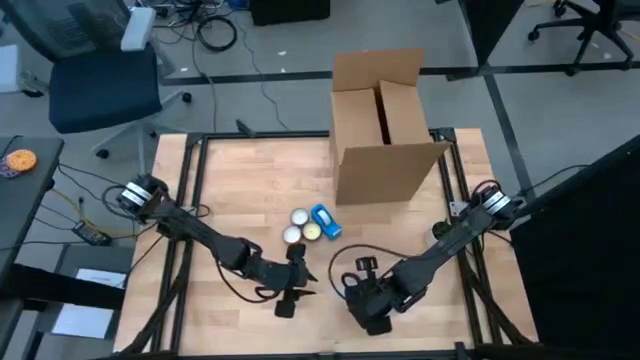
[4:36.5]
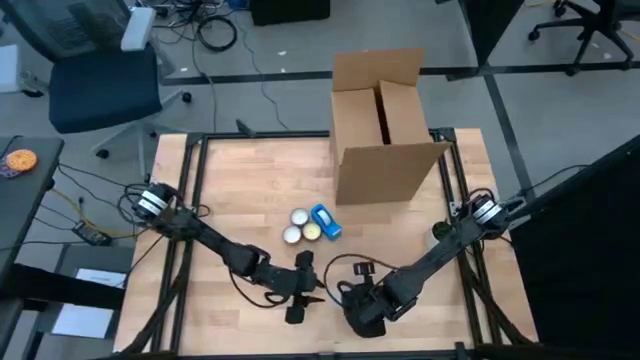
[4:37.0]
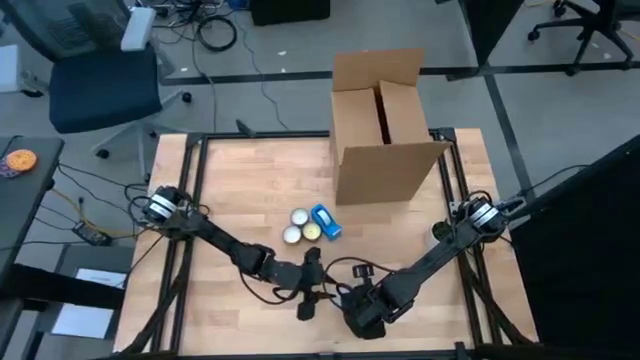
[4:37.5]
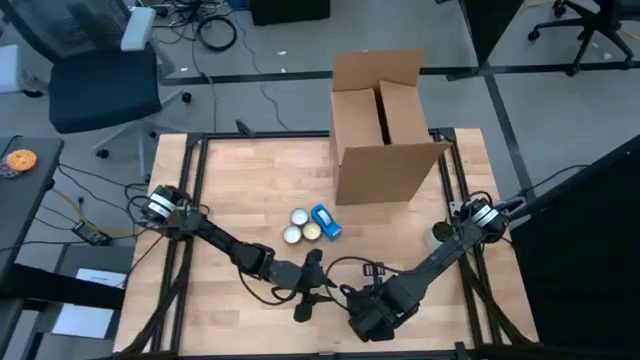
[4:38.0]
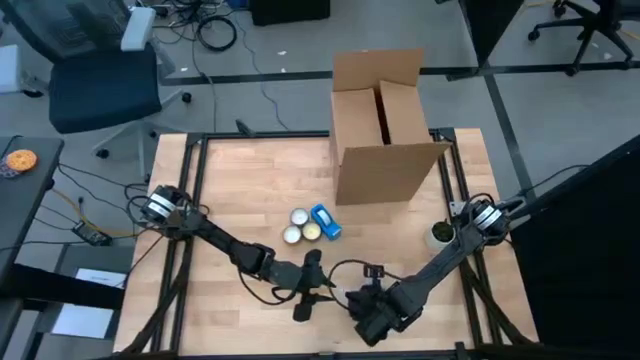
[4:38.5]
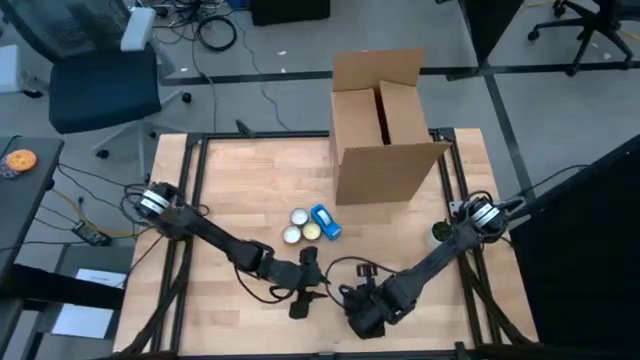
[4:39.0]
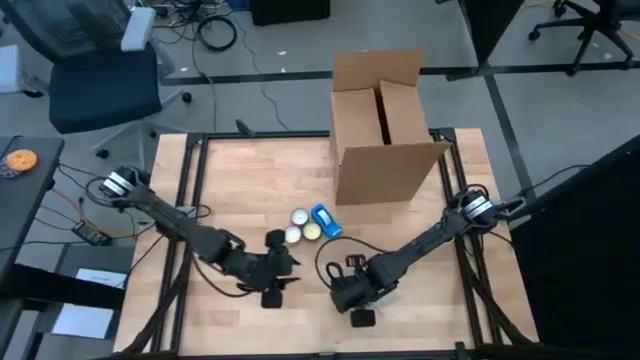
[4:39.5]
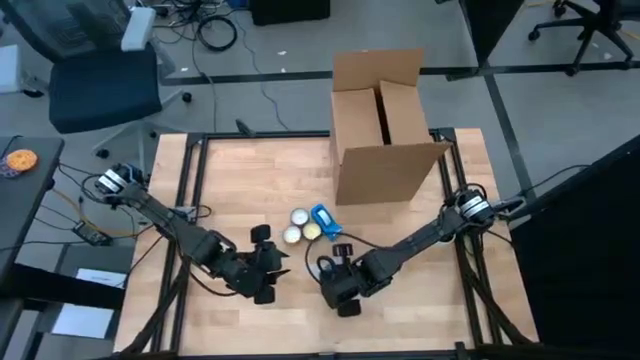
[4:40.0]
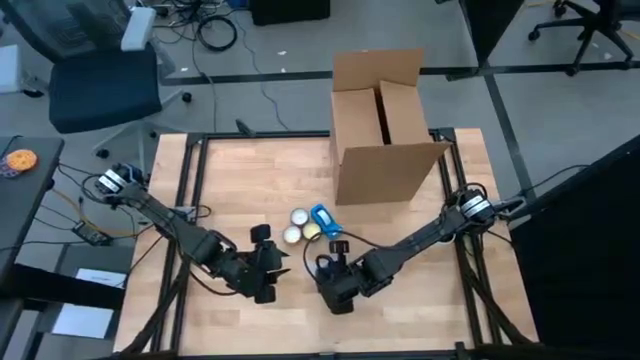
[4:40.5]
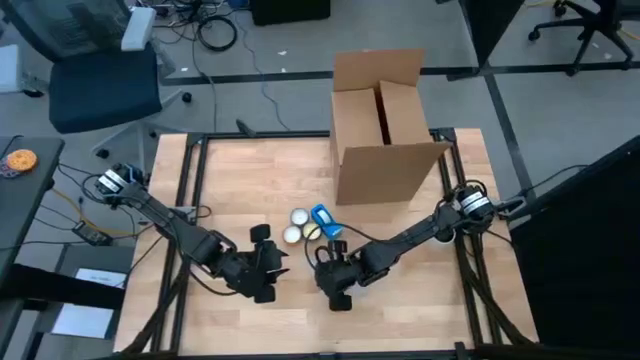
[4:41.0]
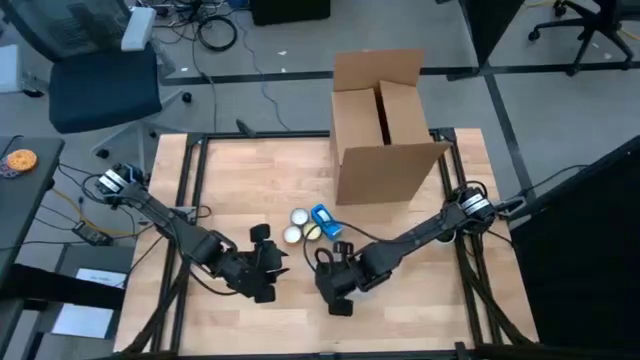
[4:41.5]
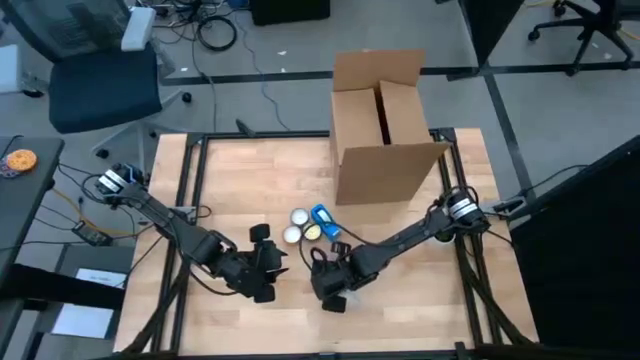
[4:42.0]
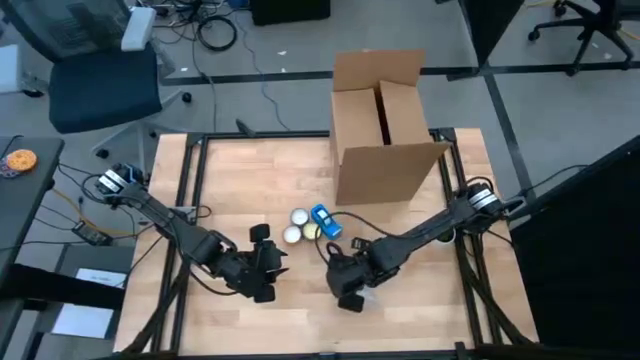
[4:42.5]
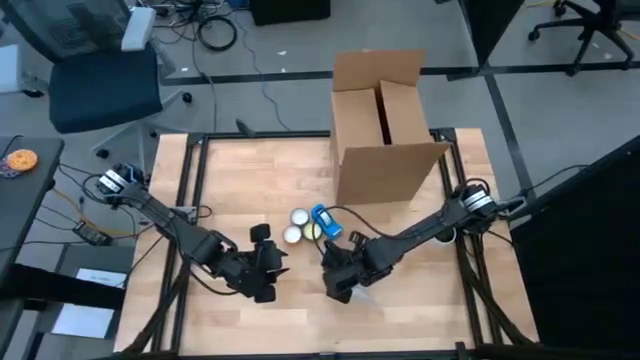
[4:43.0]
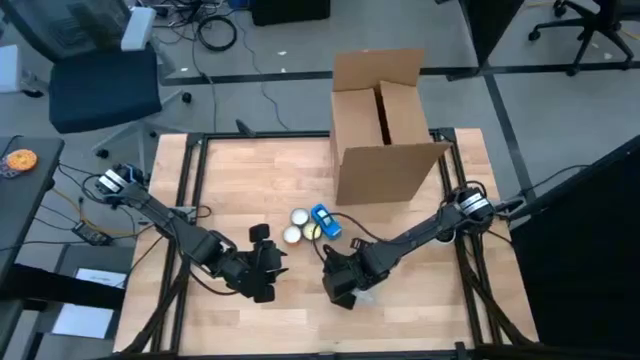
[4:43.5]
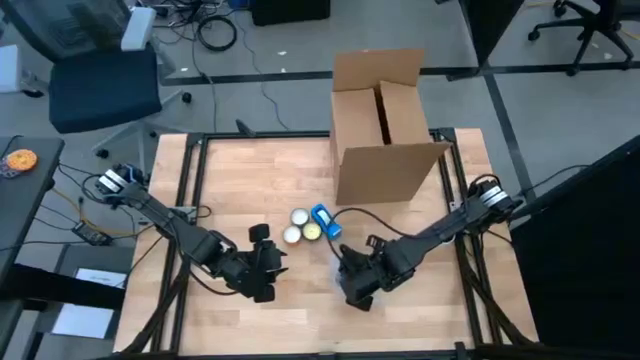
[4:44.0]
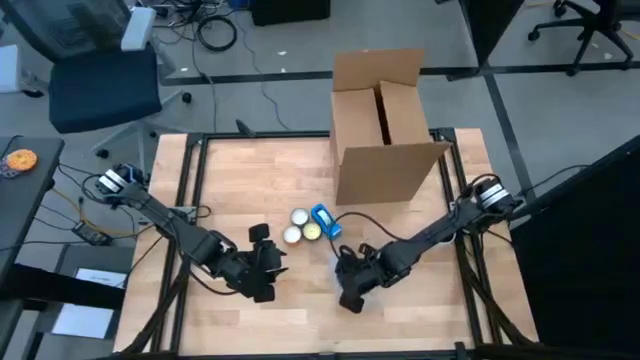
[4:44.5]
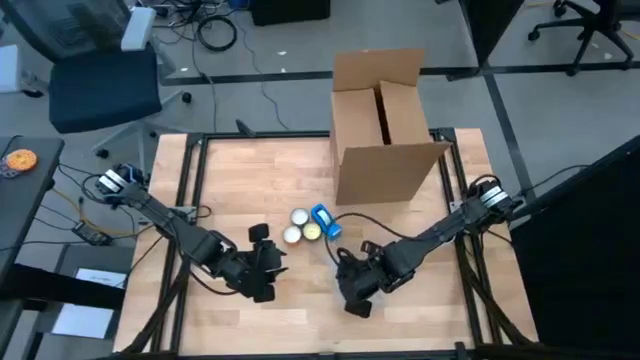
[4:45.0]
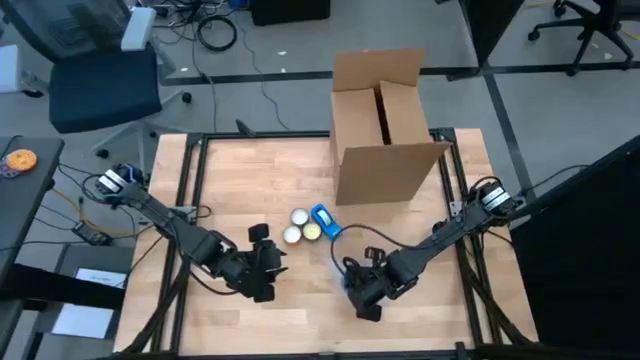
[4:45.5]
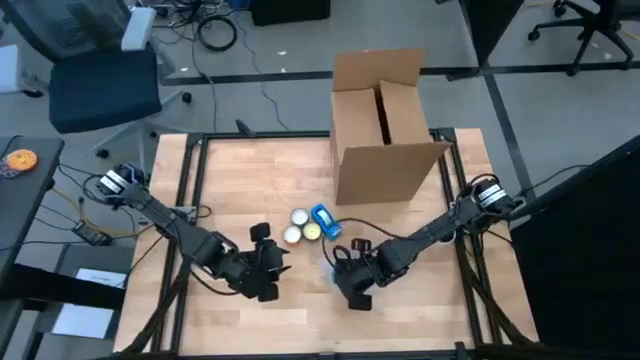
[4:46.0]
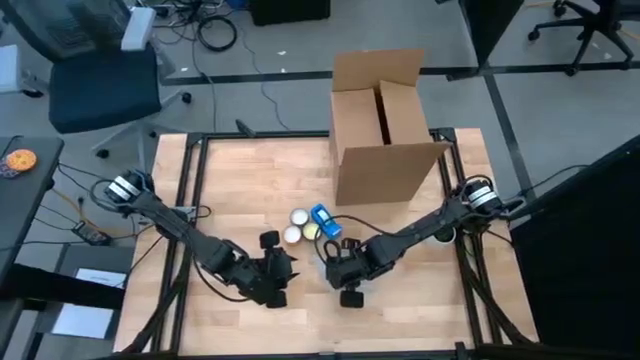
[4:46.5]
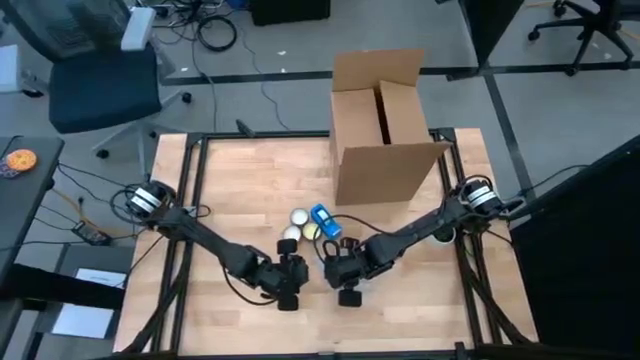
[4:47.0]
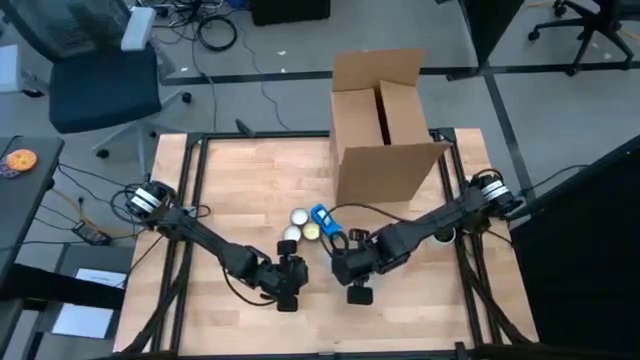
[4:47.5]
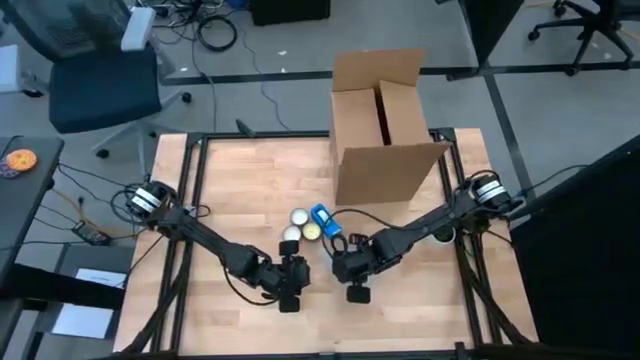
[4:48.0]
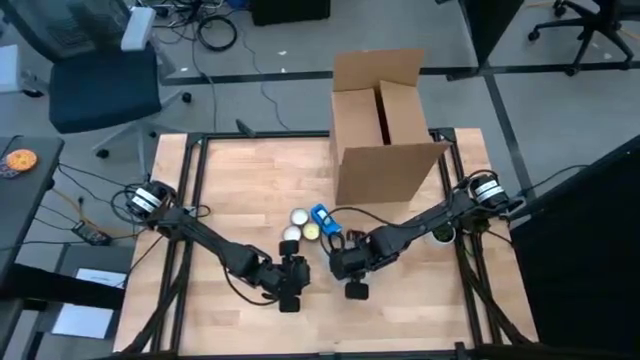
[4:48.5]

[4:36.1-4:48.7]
Task: wrap mug
Wrap the purple mug with the transparent bubble wrap

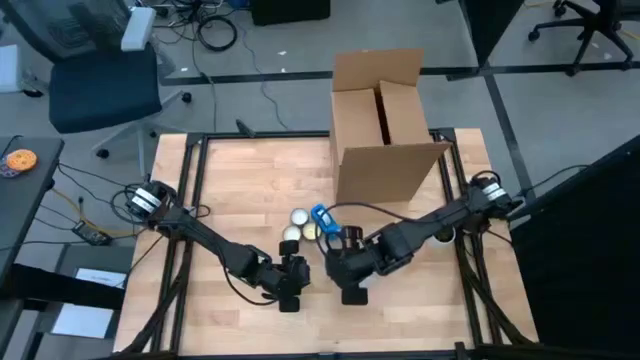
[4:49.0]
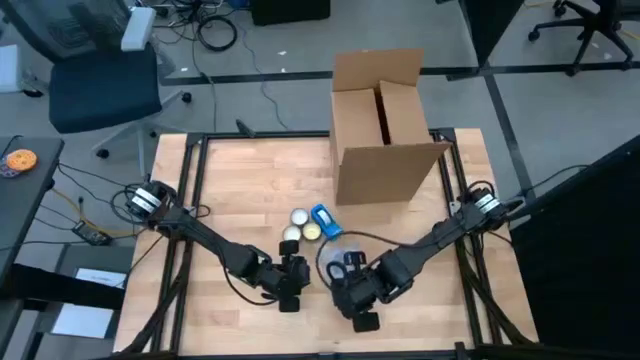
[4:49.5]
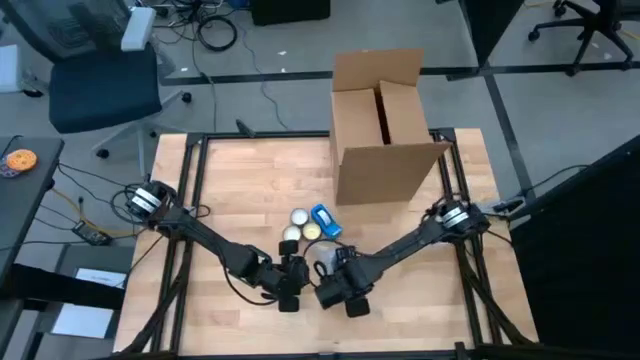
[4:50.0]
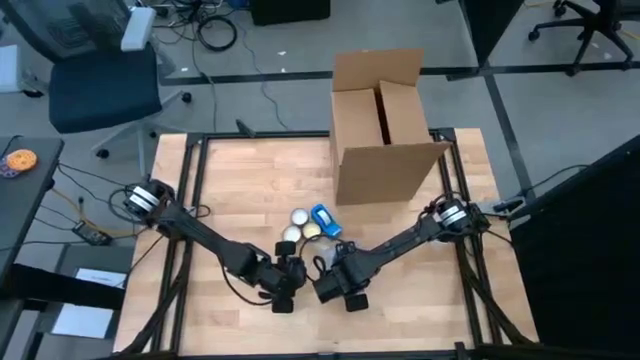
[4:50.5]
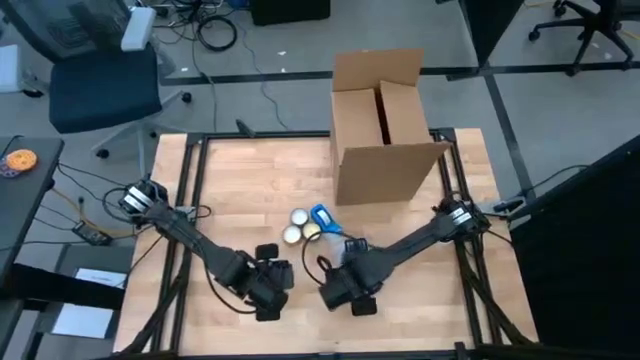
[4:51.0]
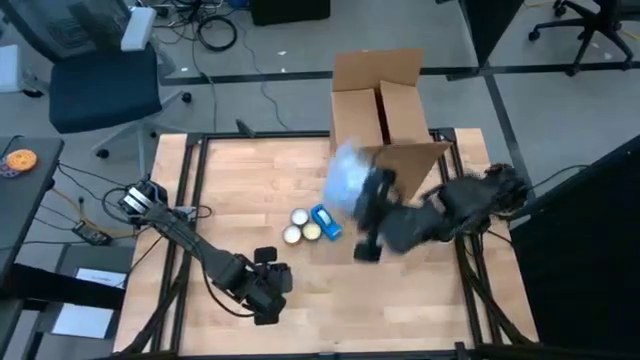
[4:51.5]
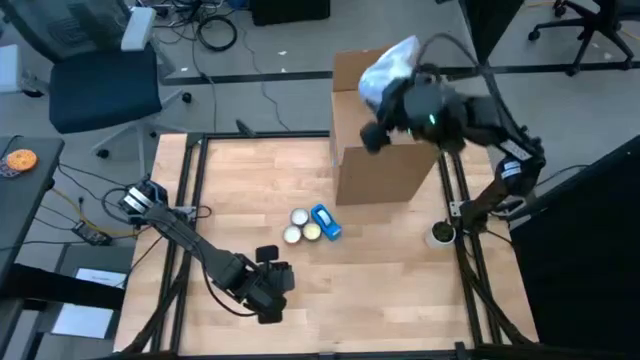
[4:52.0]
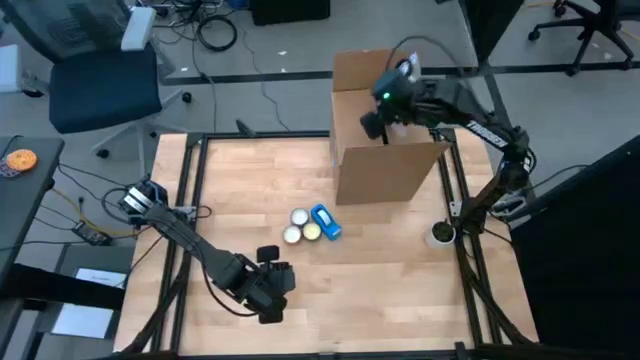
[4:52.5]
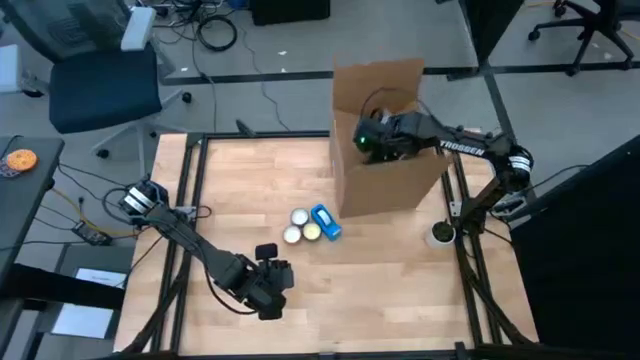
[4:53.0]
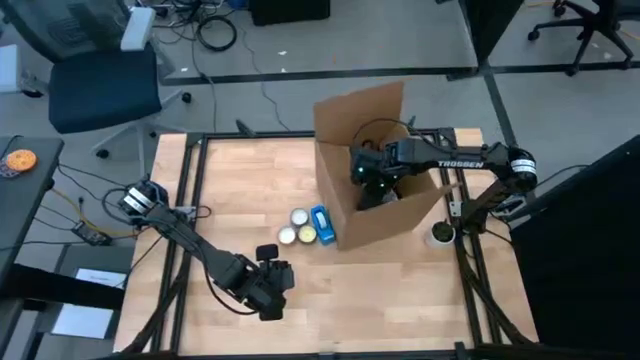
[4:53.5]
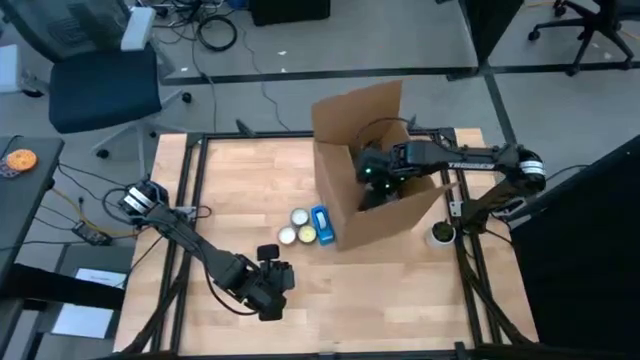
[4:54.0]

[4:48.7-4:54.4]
Put the wrapped purple mug into the brown cardboard box

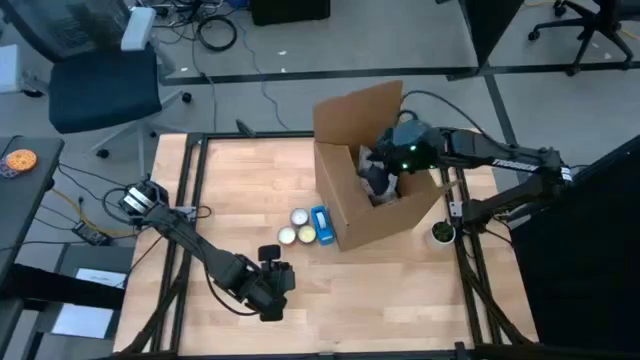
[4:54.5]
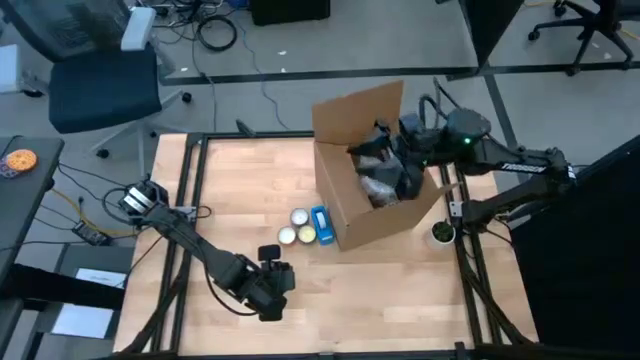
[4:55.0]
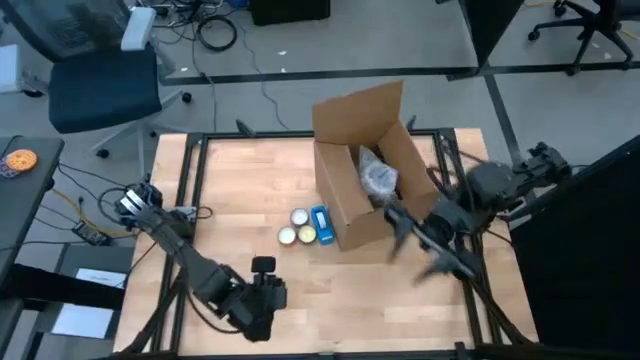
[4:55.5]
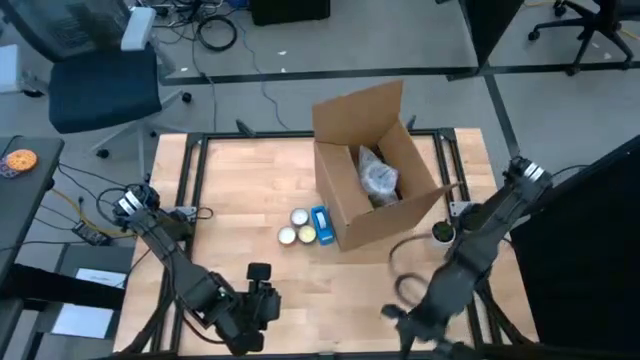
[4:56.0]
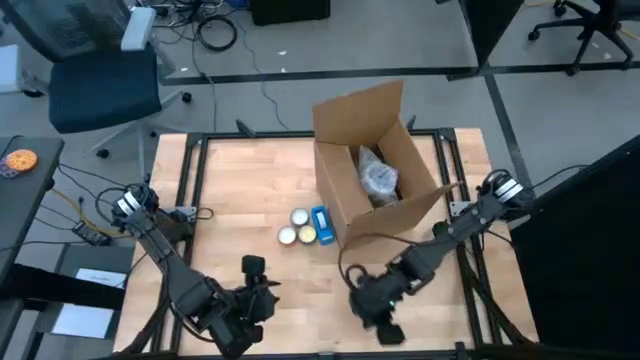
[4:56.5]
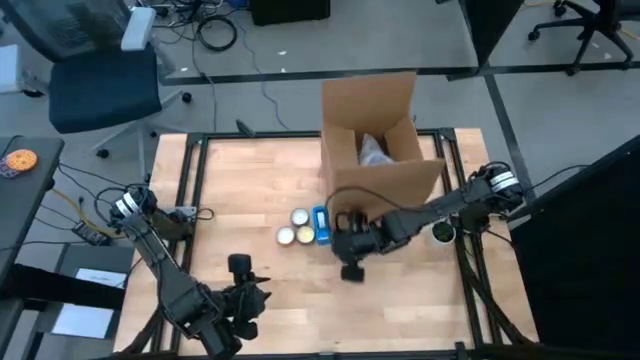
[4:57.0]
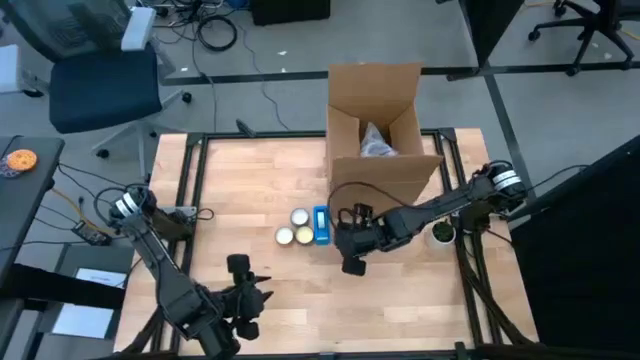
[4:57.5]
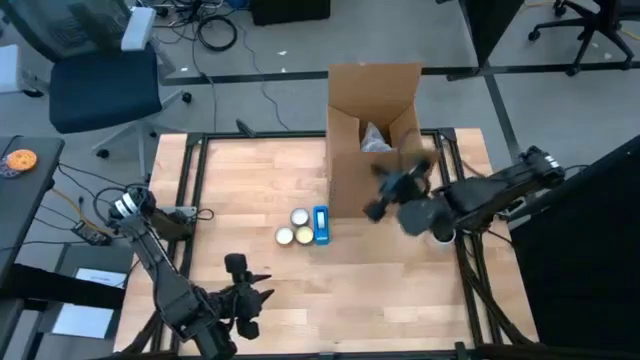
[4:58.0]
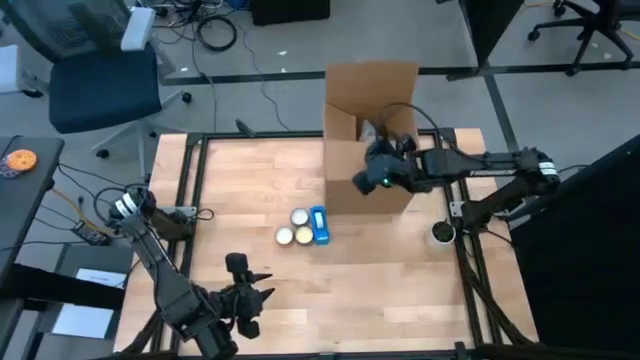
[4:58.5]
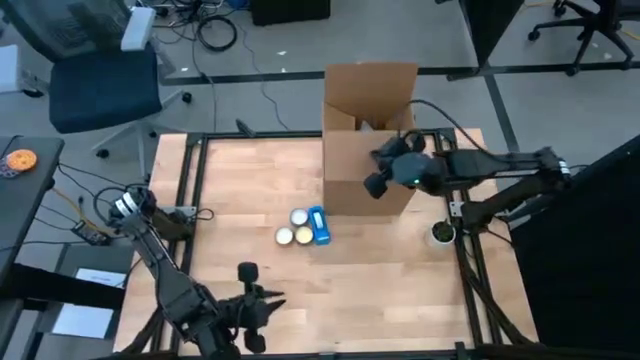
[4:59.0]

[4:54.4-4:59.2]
Adjust the brown cardboard box on the table
